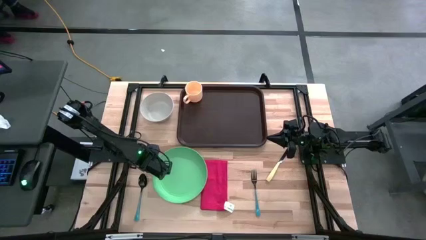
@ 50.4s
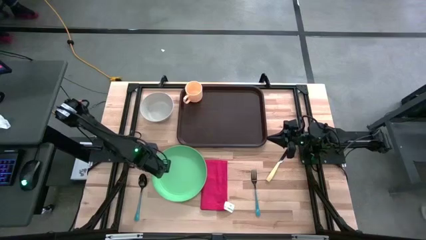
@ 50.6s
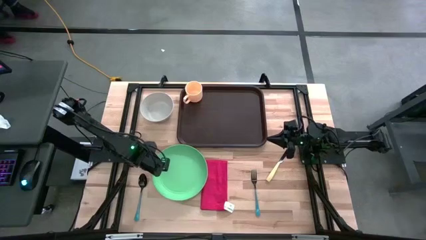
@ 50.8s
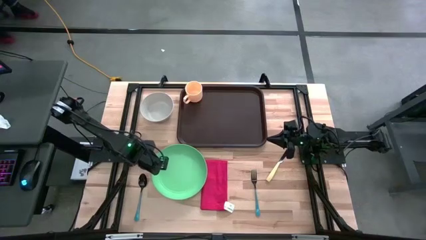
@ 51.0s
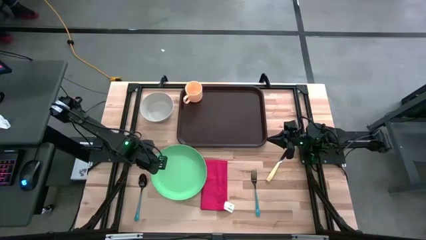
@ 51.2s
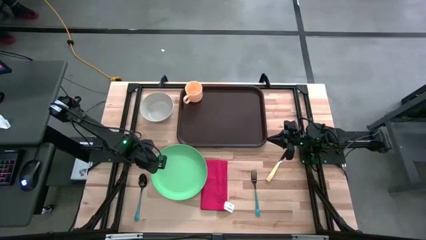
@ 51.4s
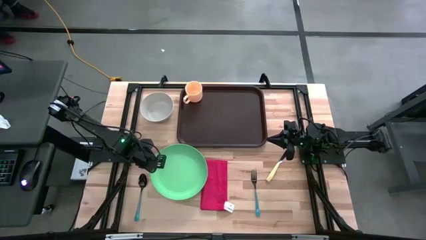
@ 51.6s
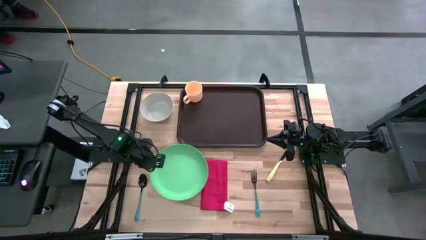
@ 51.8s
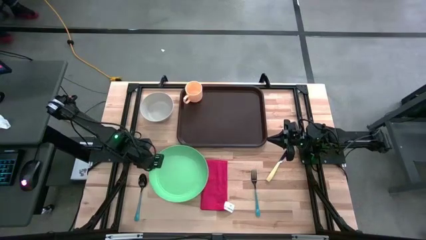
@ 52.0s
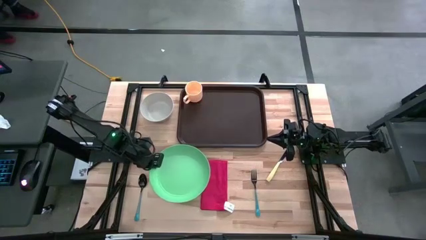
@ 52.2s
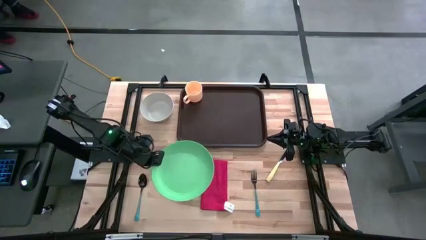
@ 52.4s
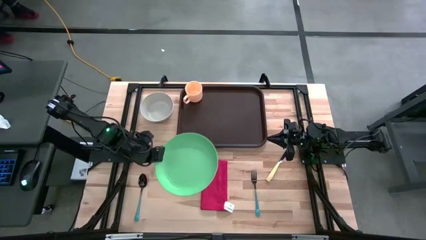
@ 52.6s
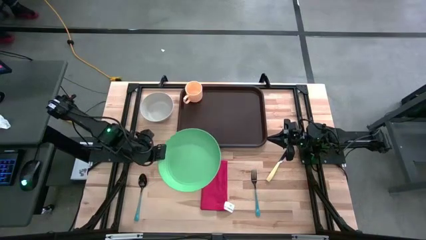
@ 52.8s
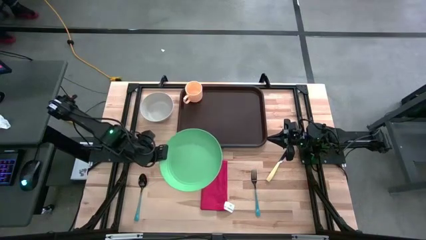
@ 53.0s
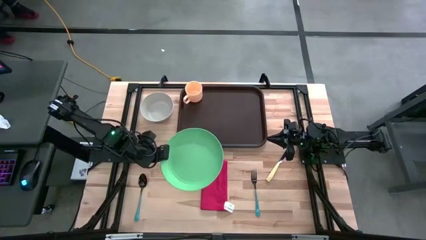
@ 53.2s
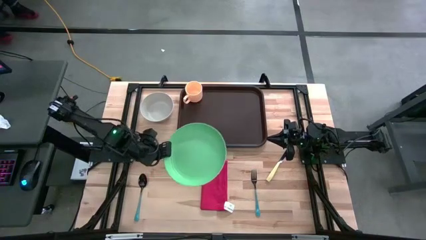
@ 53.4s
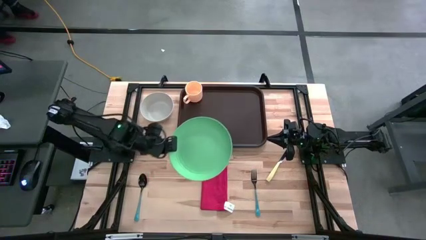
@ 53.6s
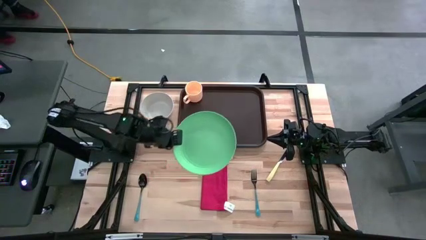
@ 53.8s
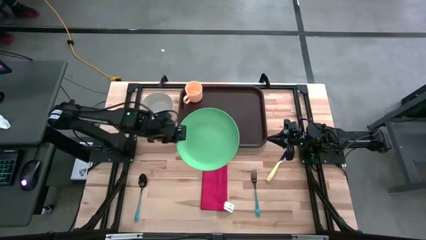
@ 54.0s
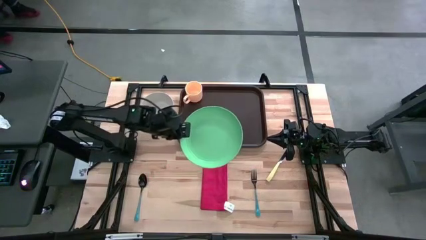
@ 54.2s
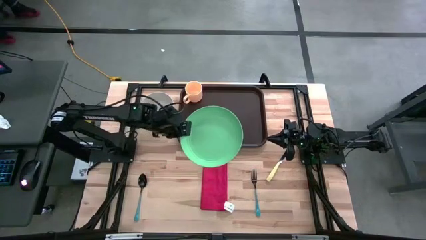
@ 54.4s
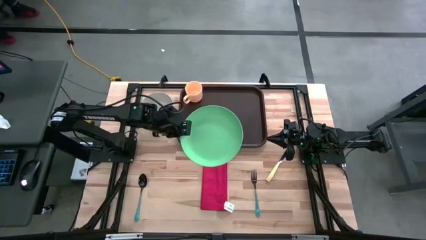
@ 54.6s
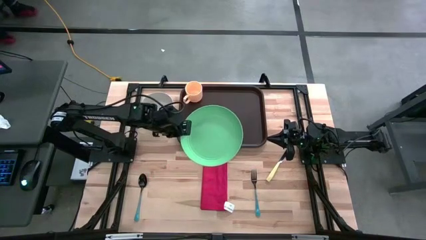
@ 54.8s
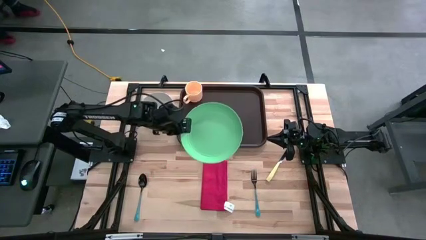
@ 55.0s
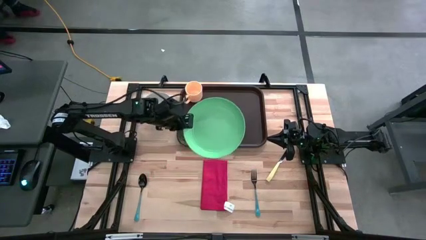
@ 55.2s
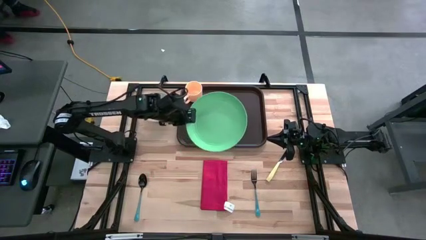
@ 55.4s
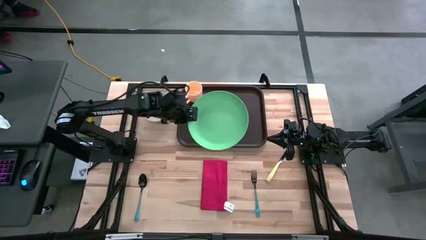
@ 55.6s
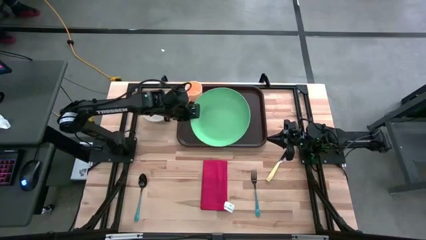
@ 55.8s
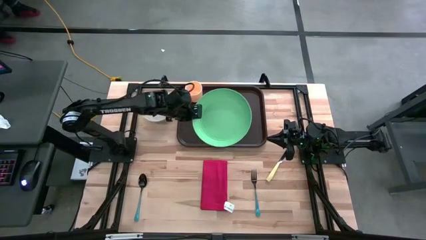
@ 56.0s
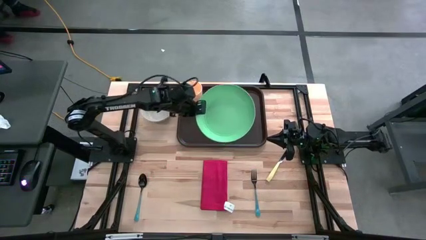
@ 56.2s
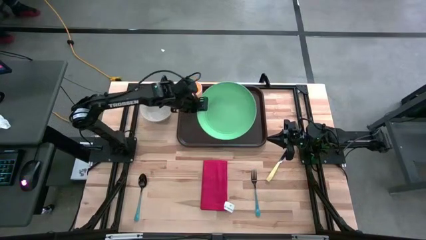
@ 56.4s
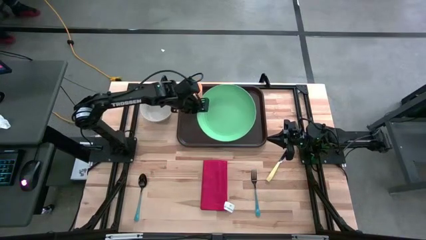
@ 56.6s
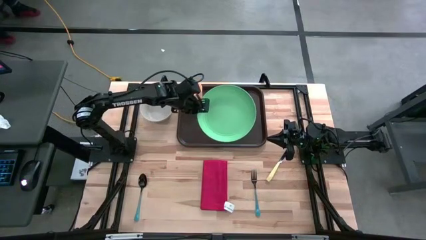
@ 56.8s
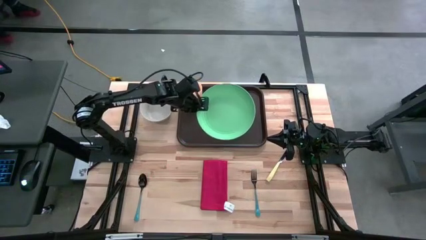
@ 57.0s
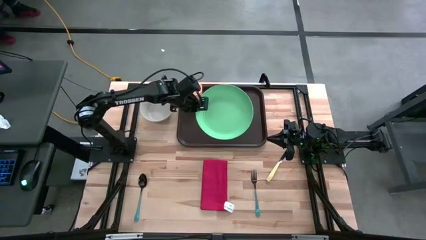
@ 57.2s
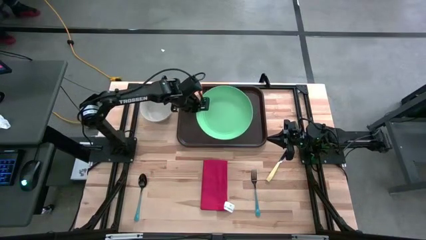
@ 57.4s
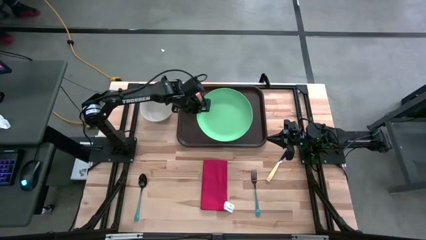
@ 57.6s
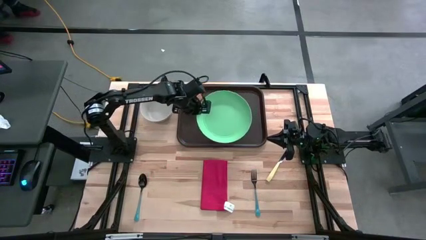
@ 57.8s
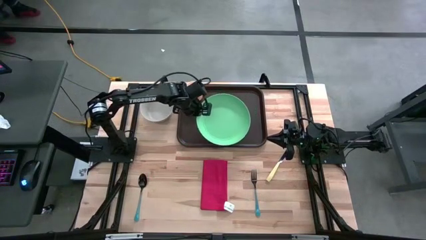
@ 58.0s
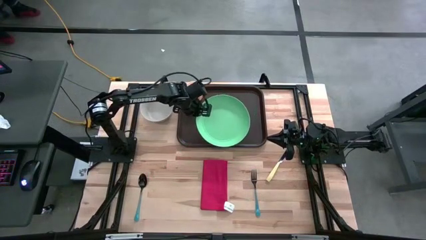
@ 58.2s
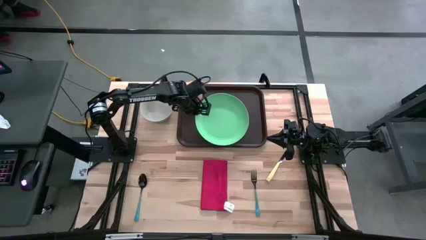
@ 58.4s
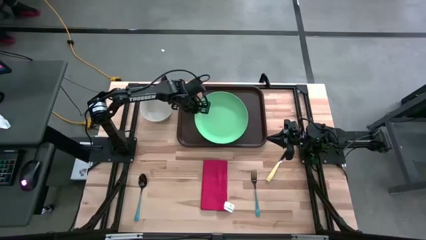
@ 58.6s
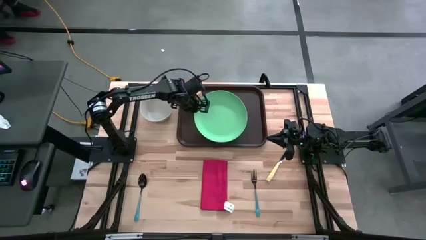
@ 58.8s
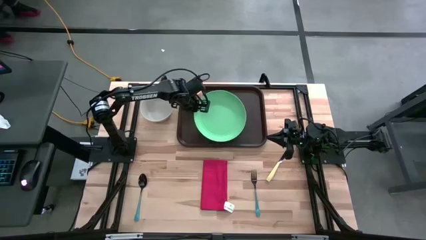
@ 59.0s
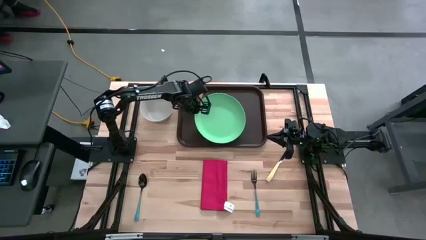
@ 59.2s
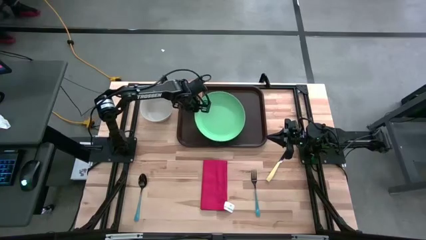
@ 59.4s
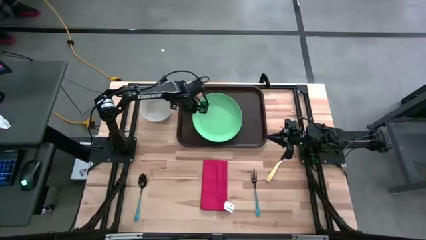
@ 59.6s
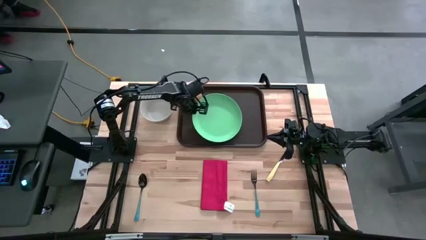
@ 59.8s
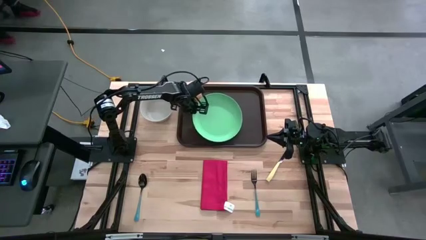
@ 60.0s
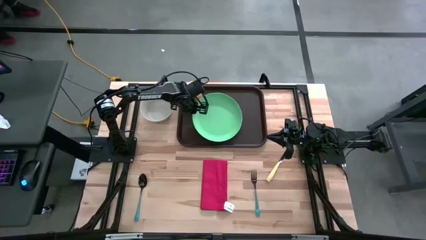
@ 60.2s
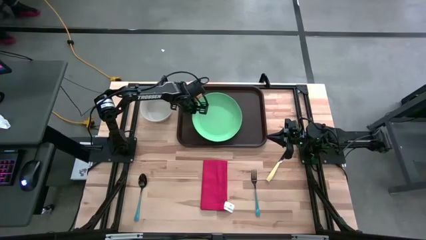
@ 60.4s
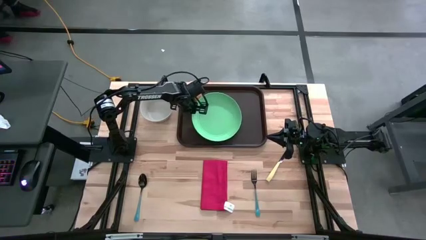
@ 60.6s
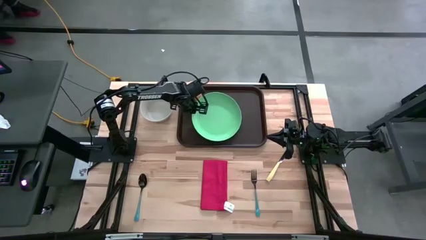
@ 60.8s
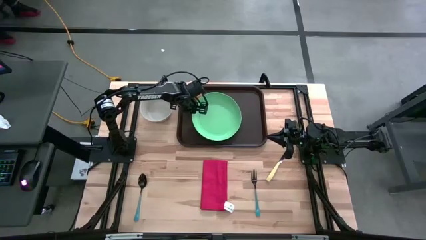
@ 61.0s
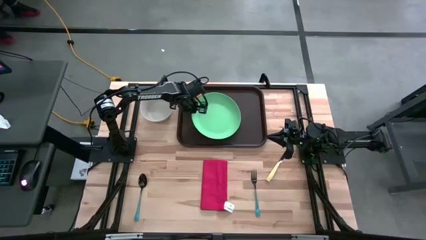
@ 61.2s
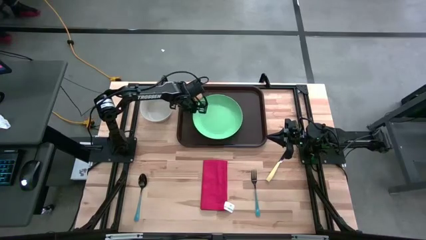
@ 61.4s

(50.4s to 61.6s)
Task: Set up tray
Put the green plate on the brown tray to the bottom of the yellow cup

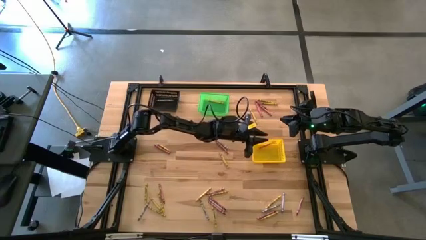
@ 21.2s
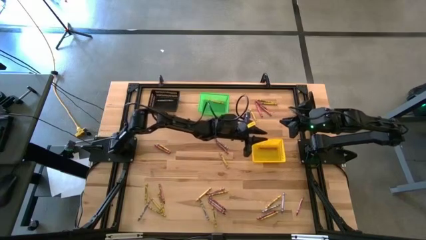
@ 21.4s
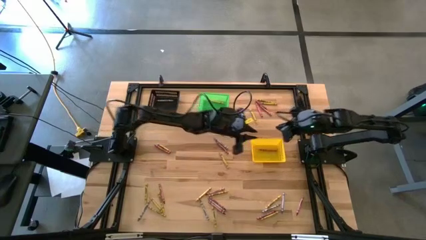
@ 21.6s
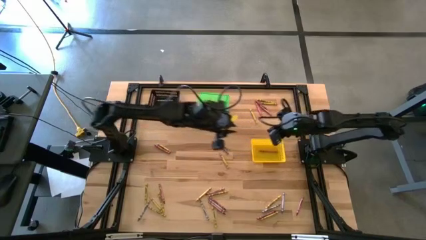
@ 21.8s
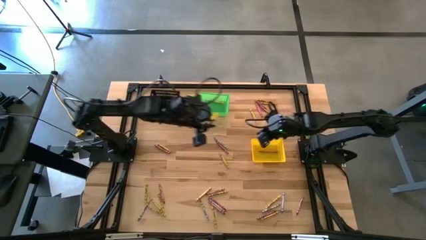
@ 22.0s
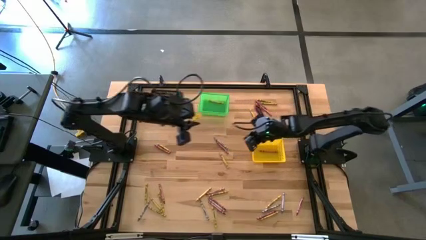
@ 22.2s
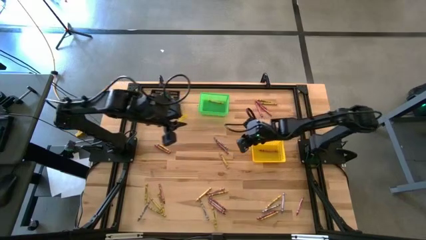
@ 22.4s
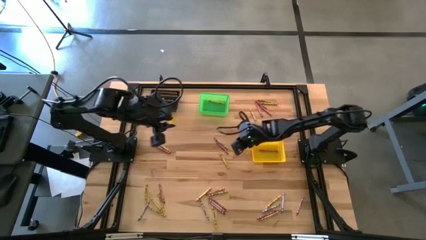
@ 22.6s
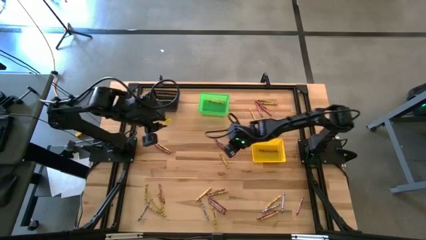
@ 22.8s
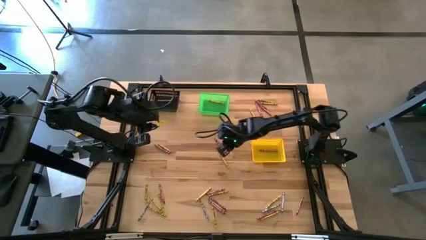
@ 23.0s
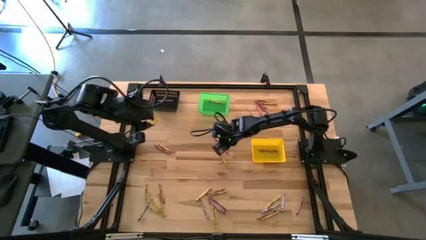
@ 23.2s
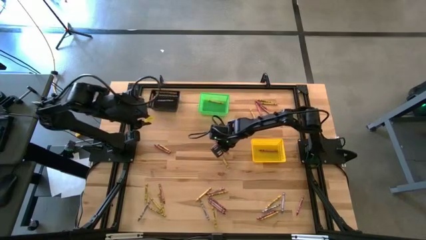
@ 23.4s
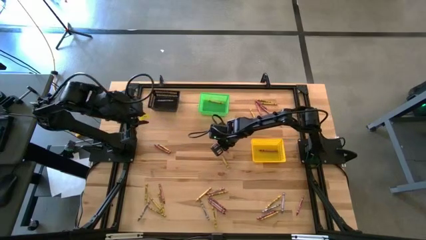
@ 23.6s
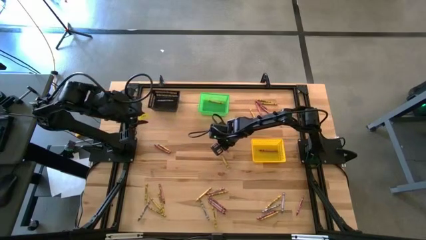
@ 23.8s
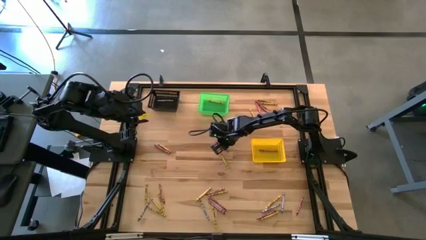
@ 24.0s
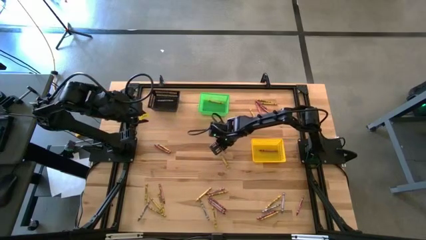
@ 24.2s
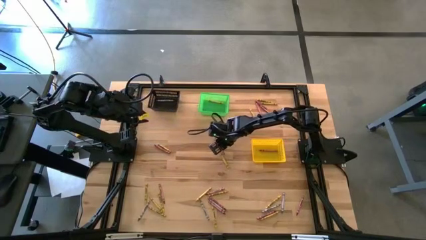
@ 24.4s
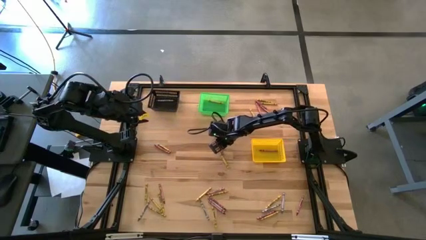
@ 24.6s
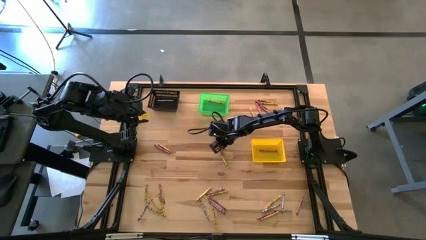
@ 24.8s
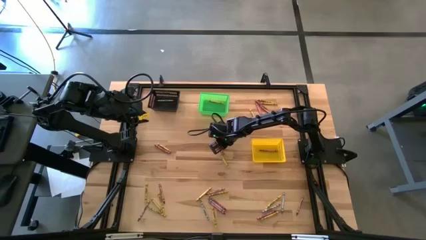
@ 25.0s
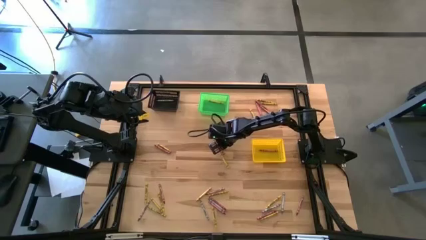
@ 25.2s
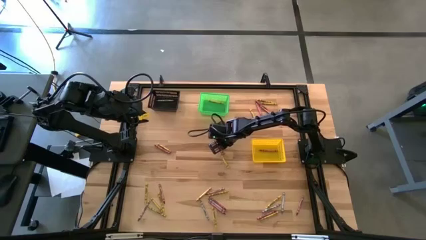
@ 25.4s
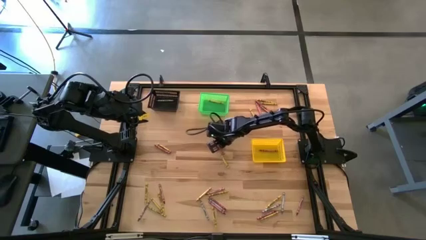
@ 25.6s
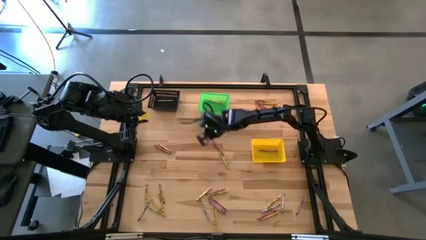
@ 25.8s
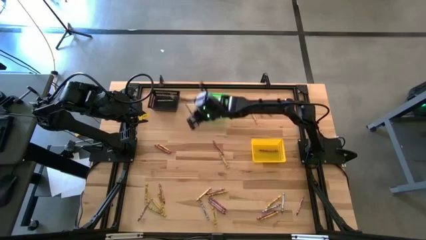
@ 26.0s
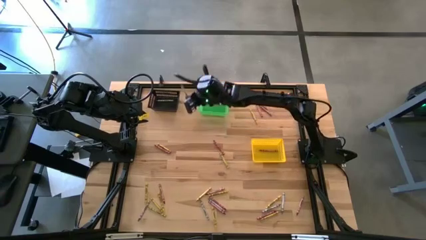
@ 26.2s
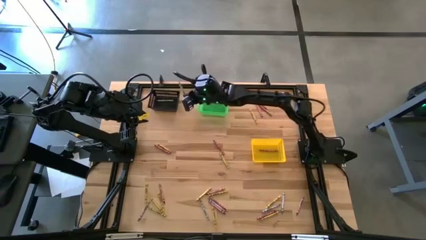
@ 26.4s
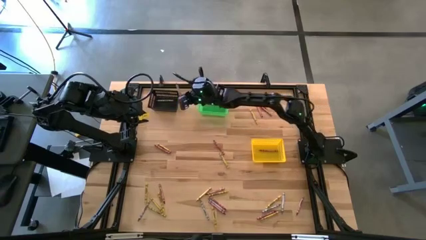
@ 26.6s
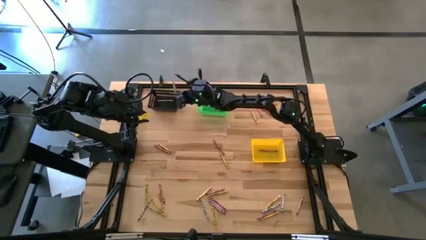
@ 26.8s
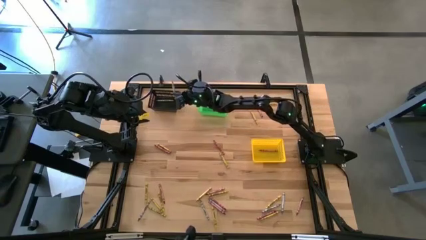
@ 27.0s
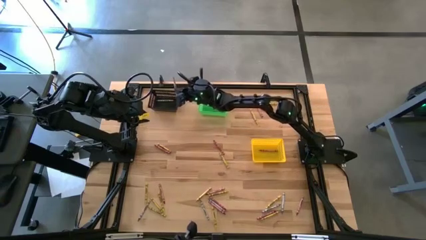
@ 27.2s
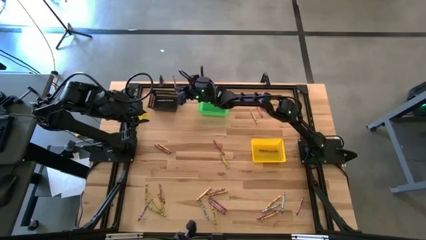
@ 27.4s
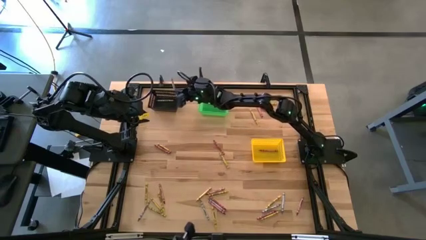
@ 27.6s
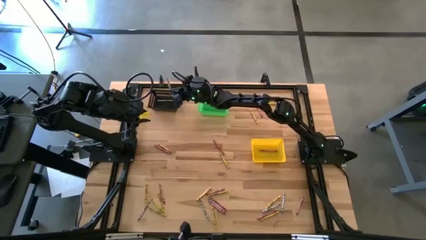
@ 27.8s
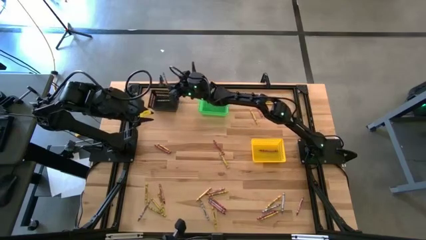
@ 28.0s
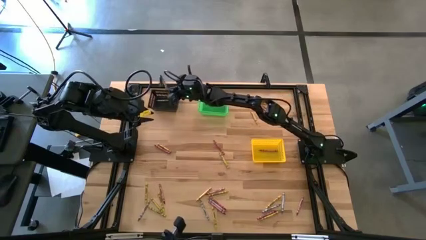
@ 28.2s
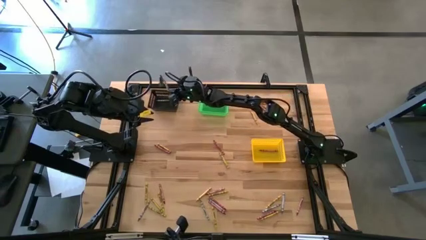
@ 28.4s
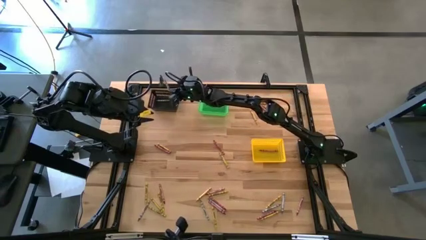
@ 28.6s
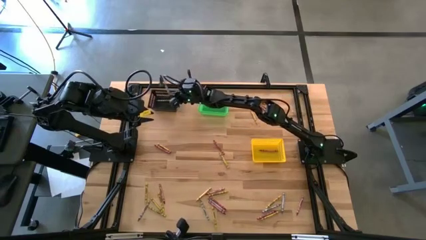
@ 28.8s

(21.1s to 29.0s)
Task: Sort crayons
Put the gray crayon into the black basket
